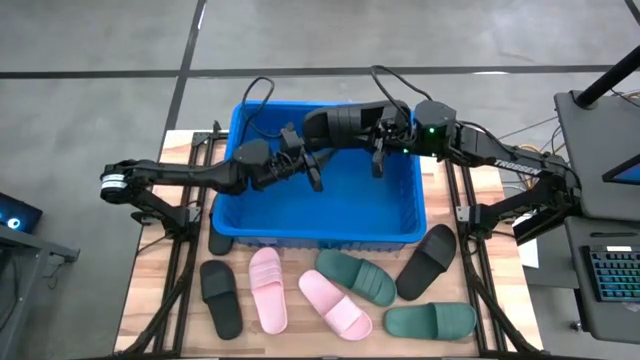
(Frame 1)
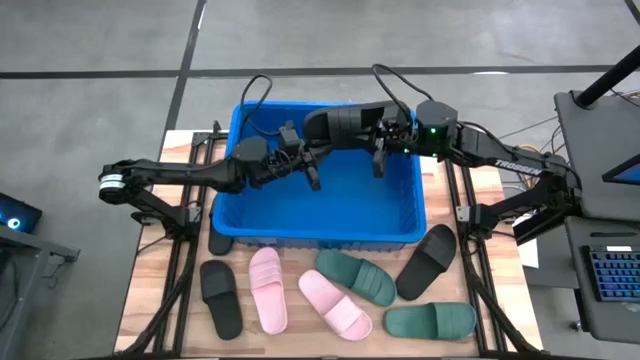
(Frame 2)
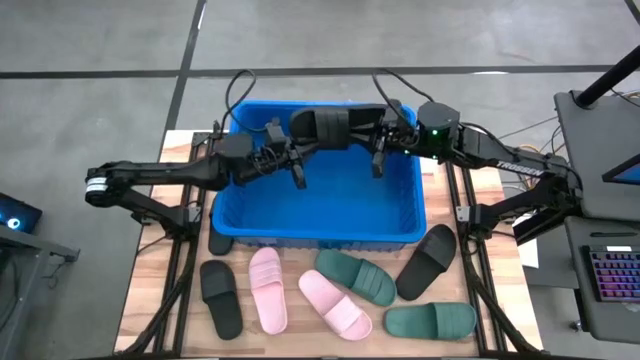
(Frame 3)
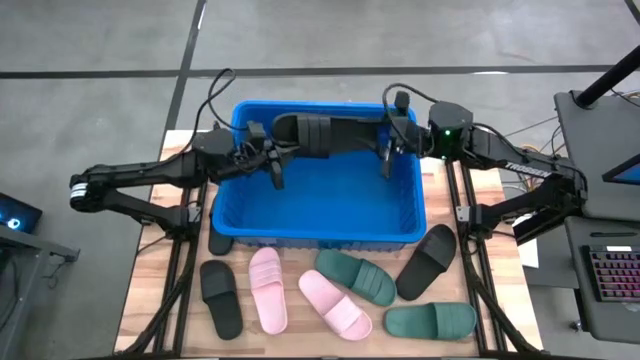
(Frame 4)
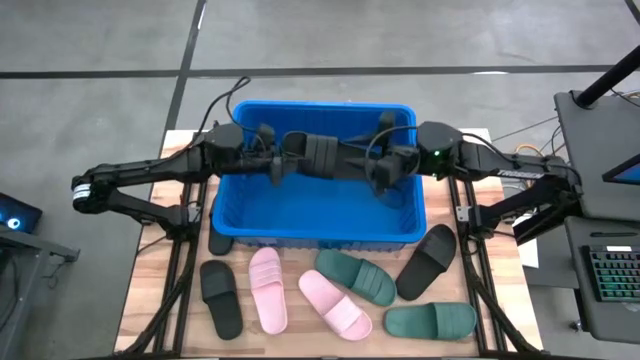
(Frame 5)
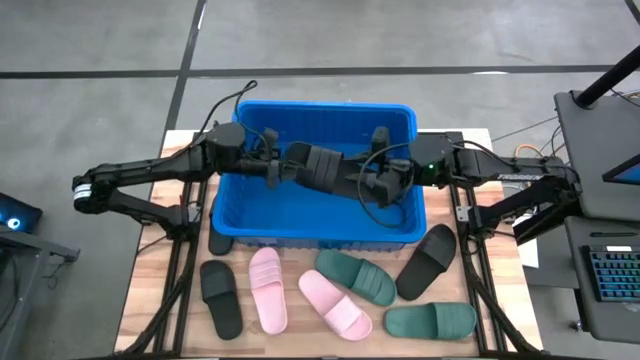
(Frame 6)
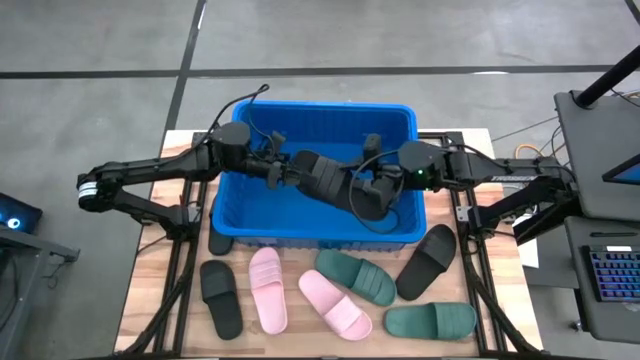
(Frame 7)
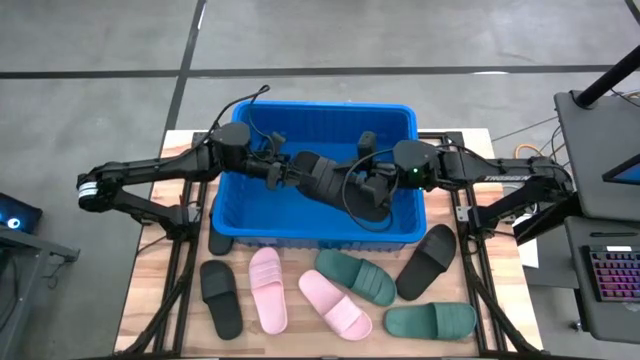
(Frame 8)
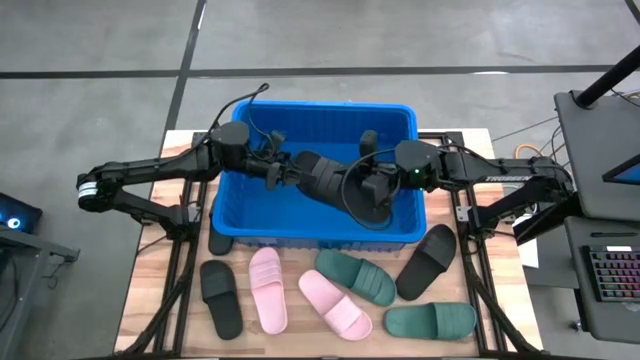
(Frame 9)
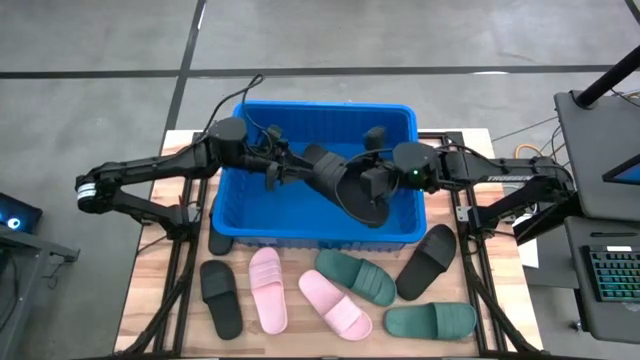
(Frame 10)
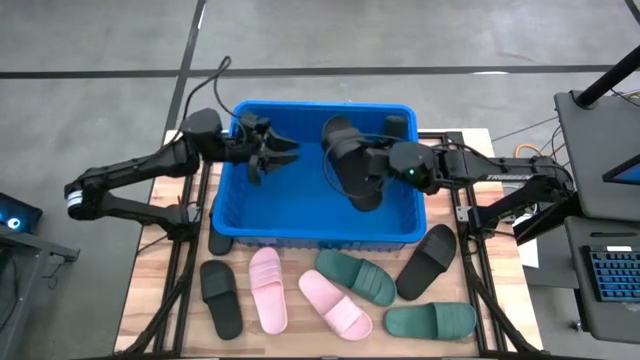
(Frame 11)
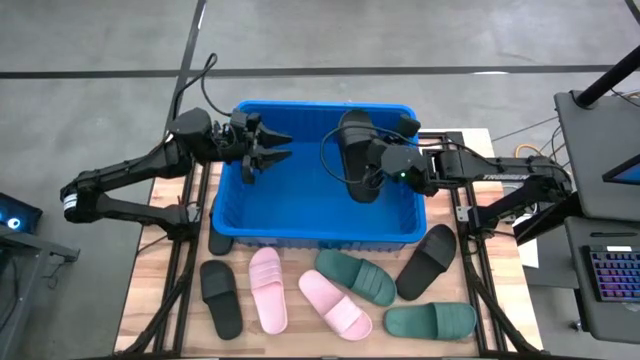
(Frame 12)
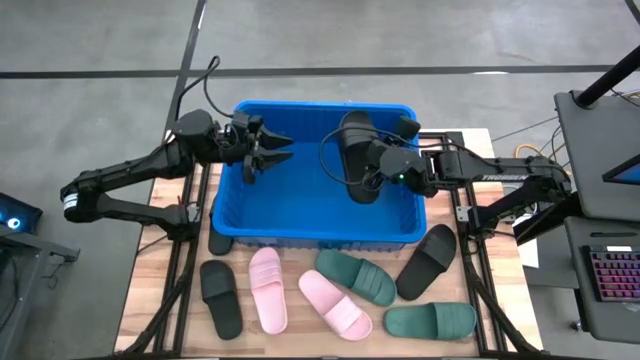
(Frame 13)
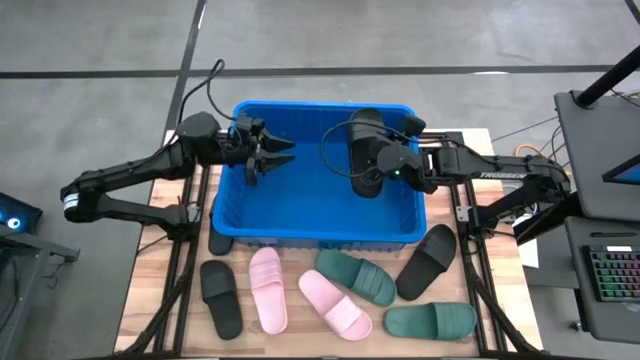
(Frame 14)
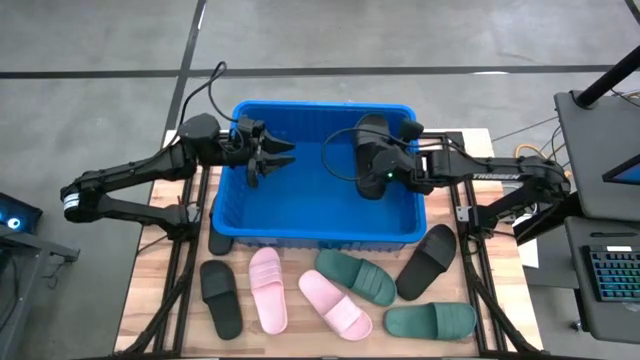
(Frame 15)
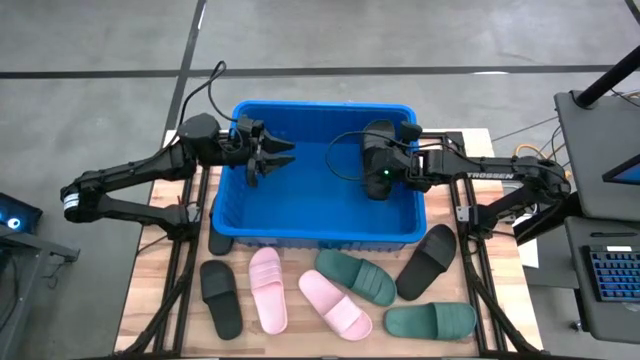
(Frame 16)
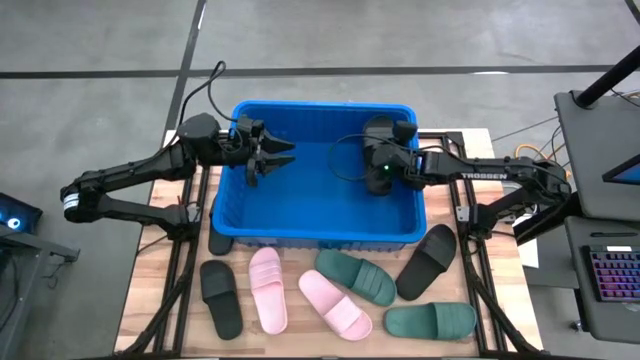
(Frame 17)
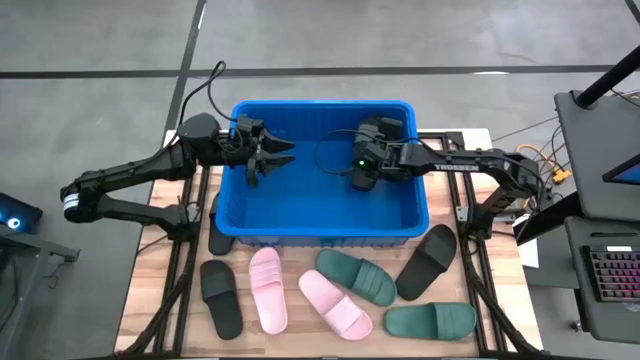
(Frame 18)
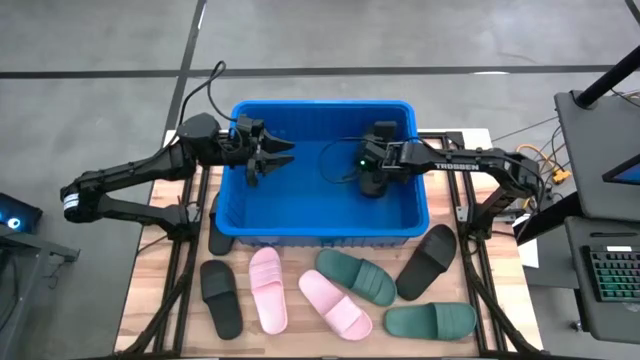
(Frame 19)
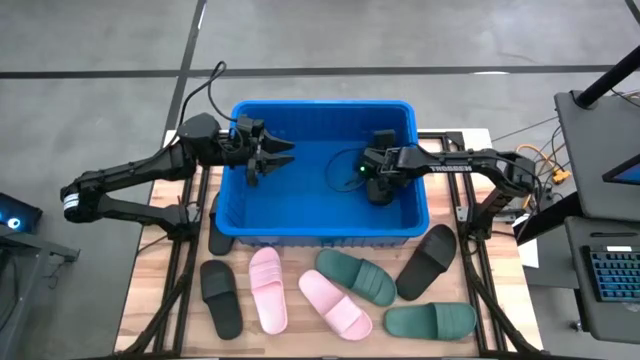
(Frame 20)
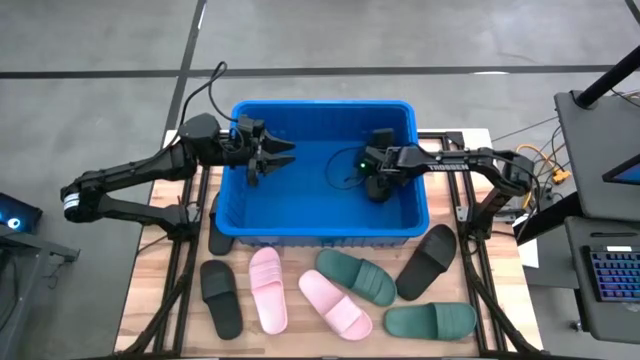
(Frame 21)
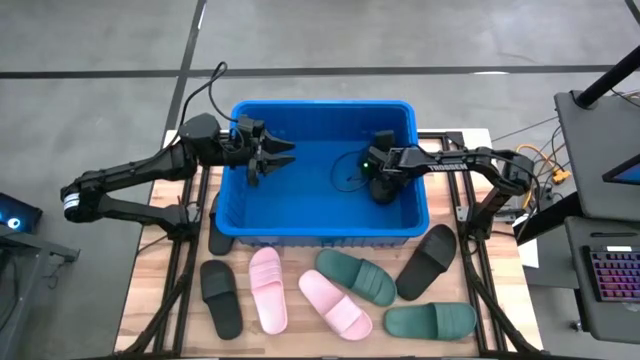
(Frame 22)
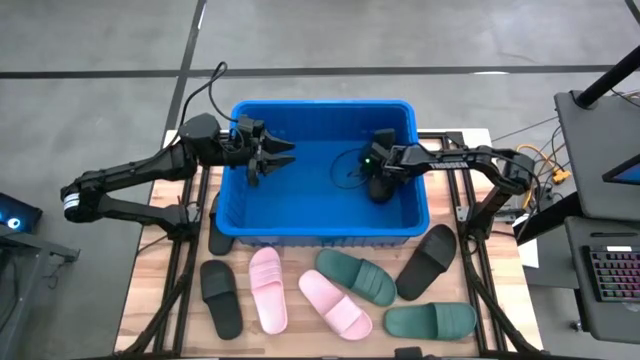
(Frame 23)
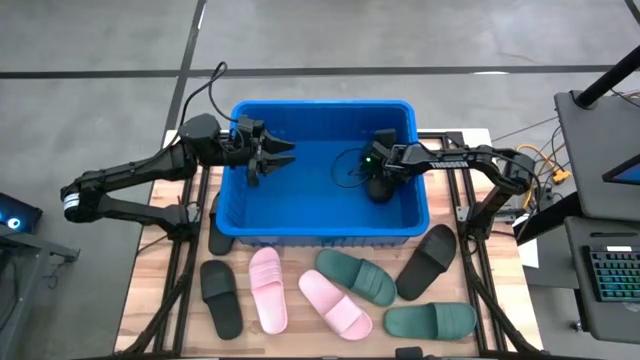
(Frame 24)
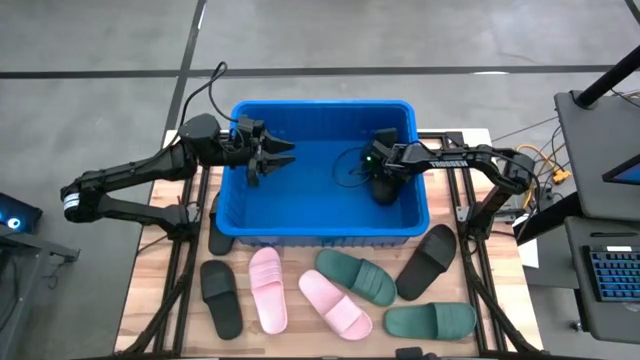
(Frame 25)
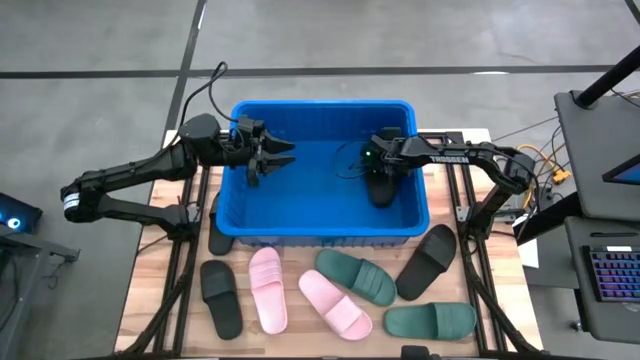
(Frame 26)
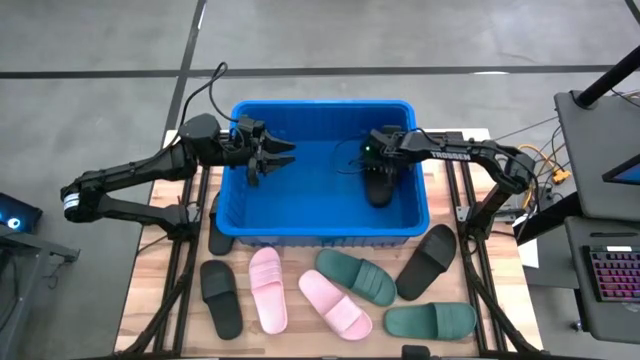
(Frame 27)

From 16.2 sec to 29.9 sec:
Task: Pick and place slides into bin
Put the black slide into the blue bin

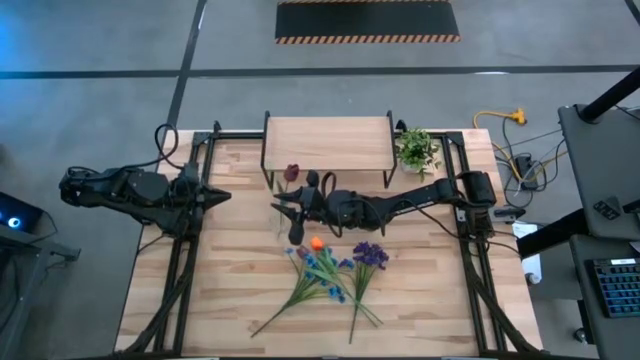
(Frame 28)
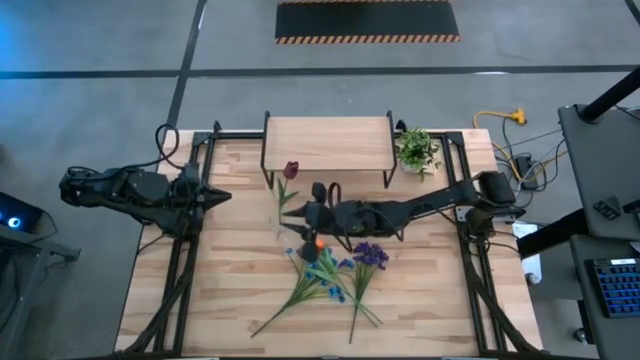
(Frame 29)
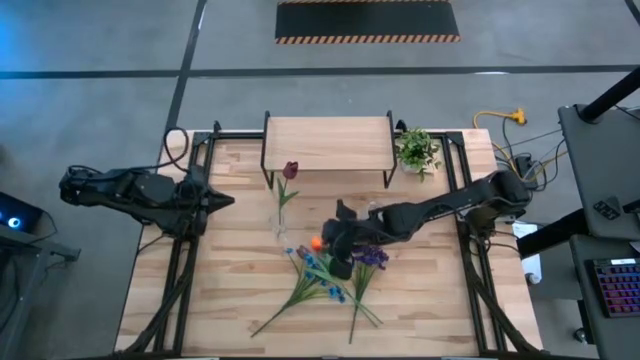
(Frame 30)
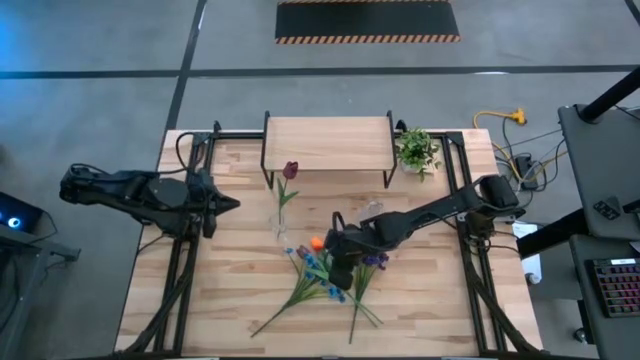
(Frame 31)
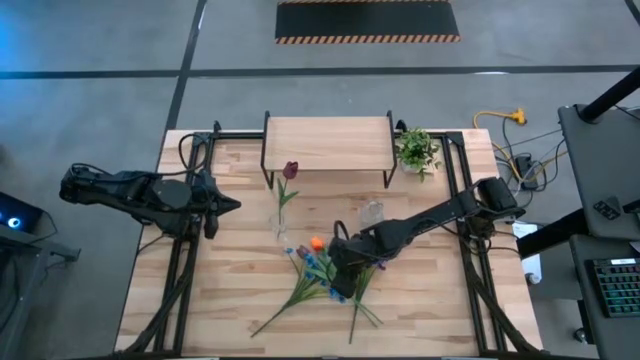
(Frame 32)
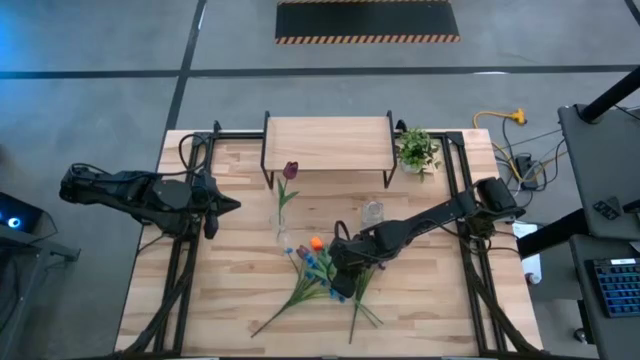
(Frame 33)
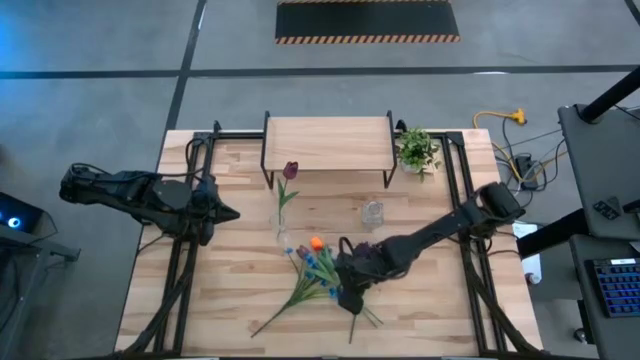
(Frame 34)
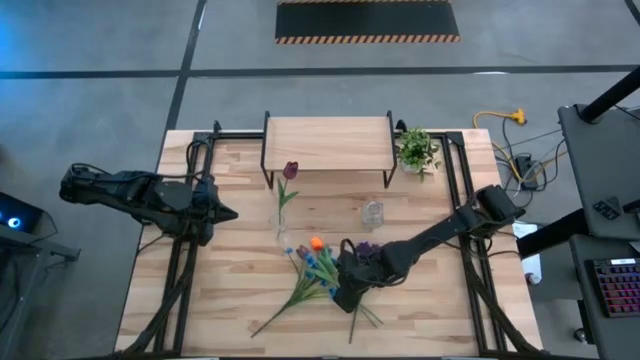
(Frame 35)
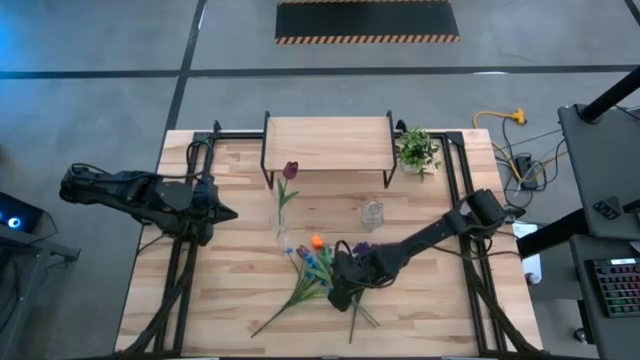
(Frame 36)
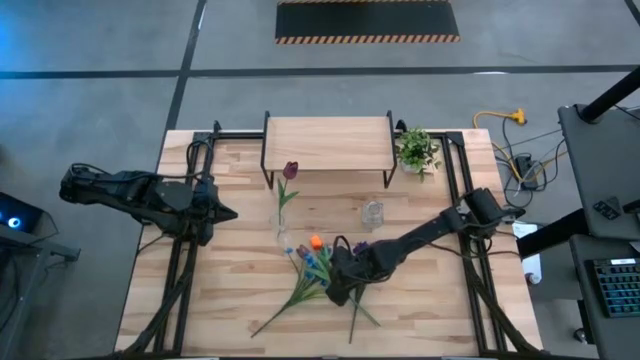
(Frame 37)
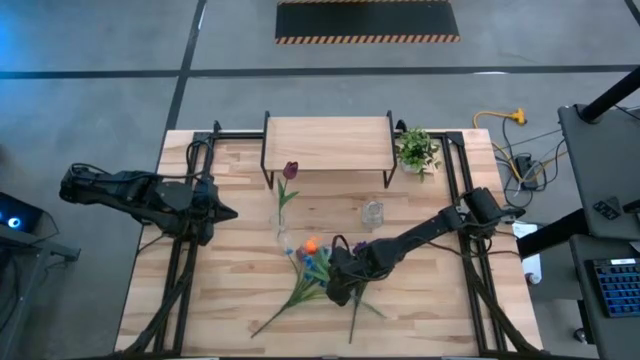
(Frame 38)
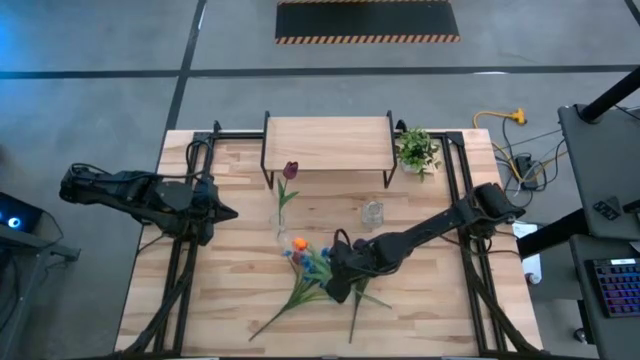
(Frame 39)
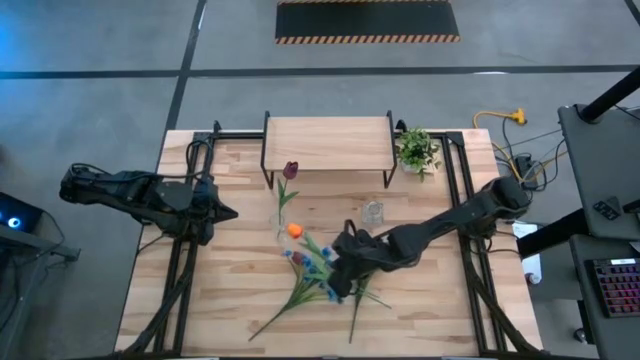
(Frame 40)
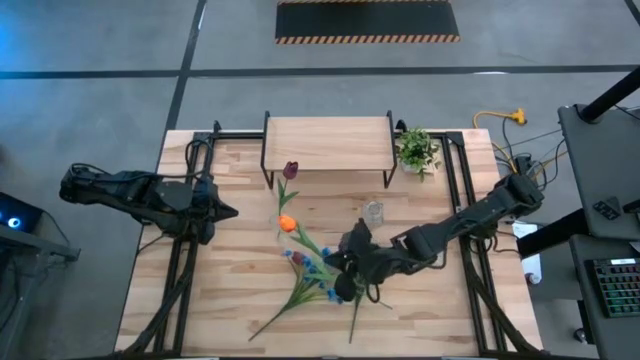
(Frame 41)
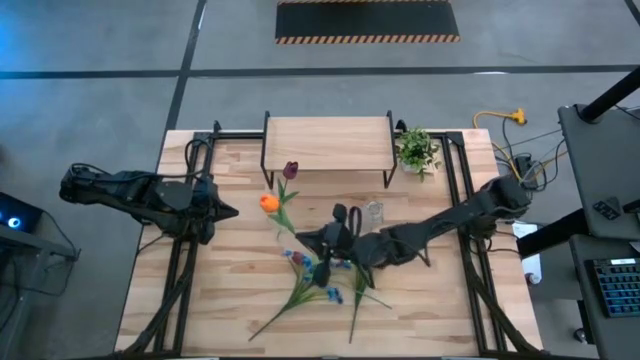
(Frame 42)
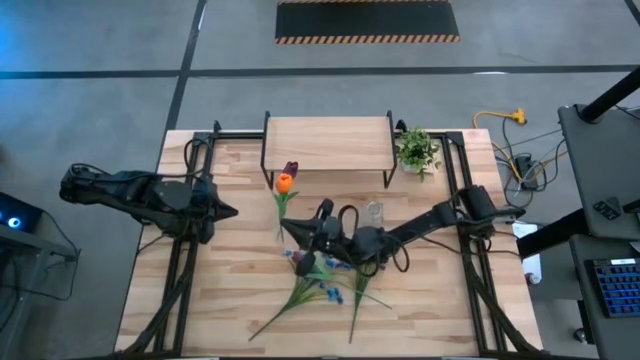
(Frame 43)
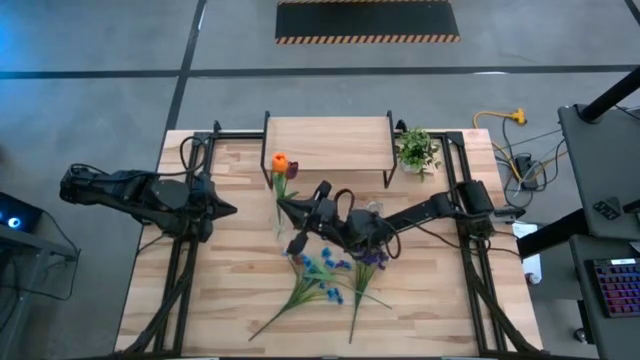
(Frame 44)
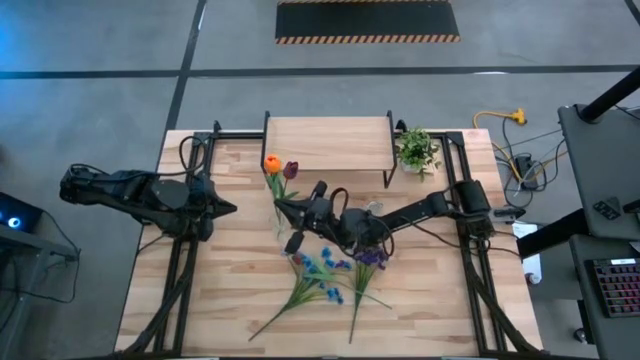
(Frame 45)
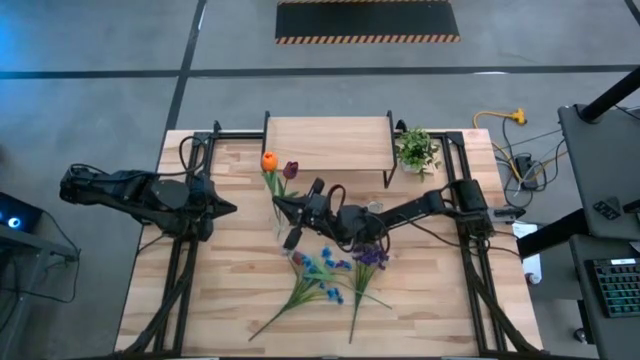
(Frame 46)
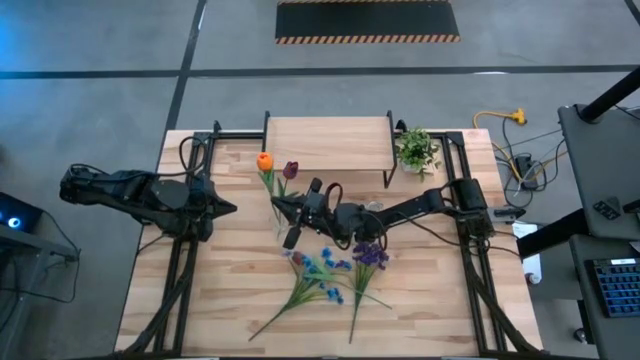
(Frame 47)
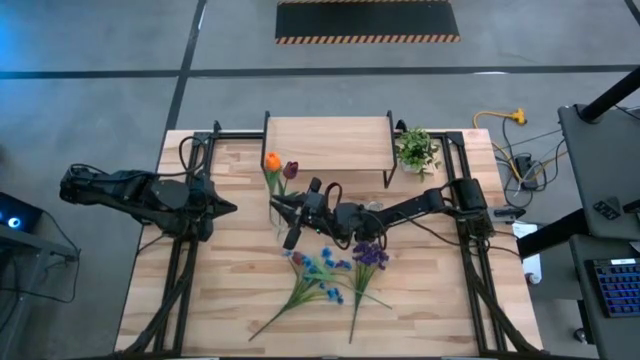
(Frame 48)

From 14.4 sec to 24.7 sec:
Task: Pick and place flowers into a vace then onto a shelf
Put the orange tulip into the left transparent vase
